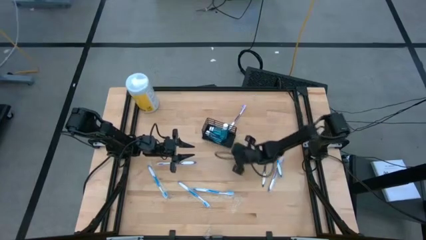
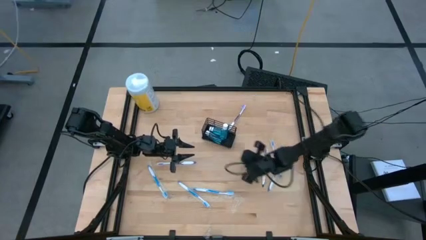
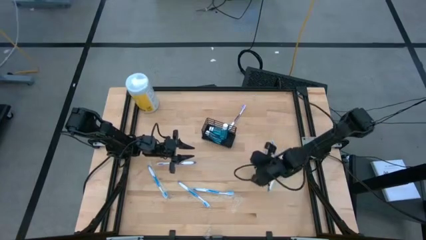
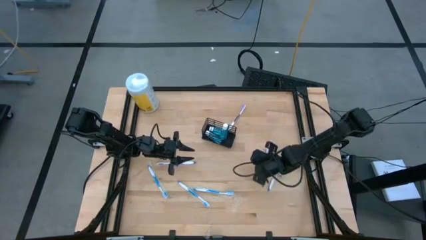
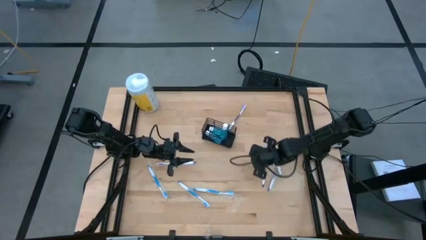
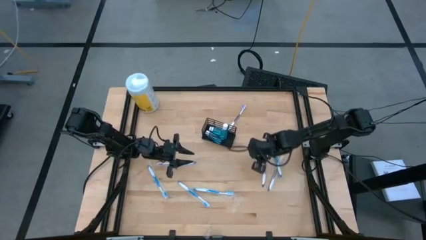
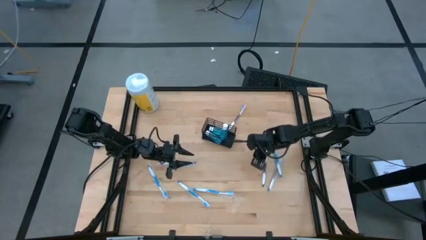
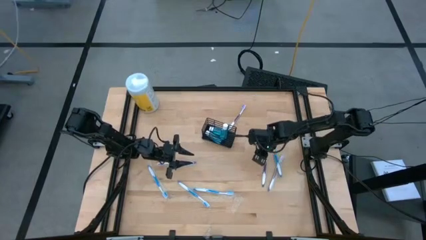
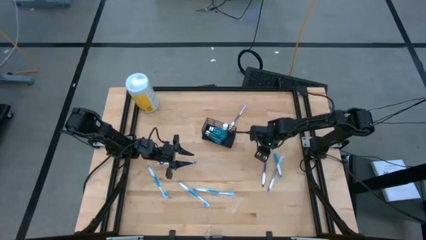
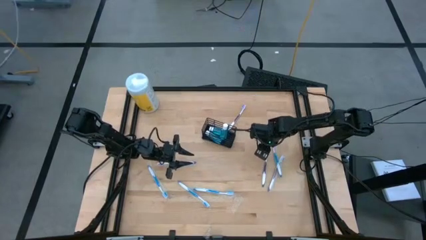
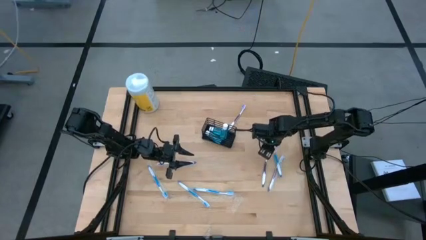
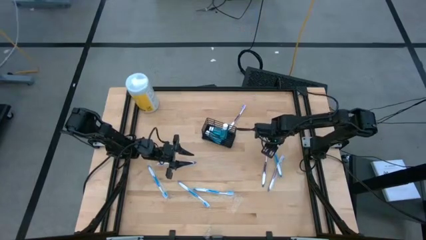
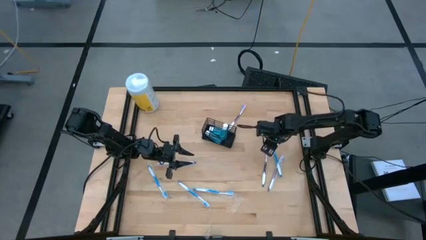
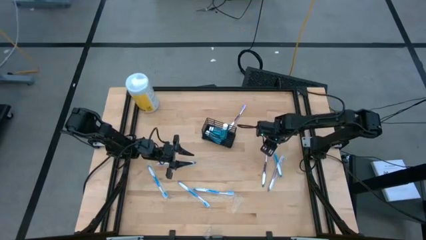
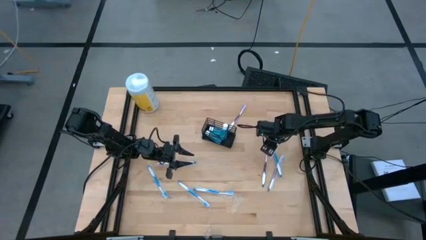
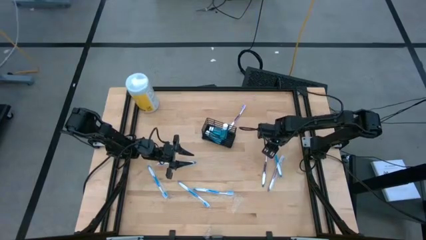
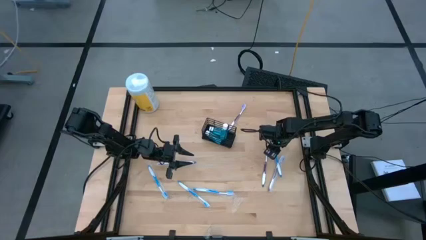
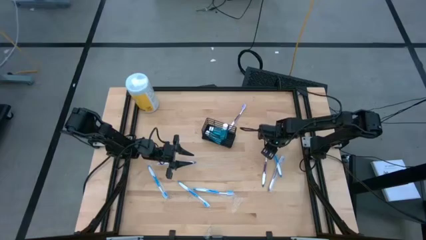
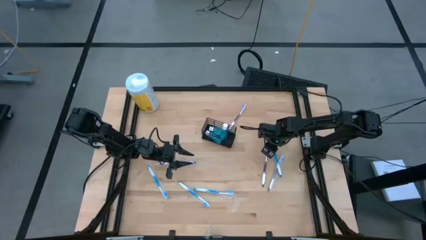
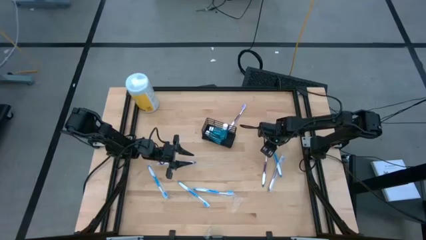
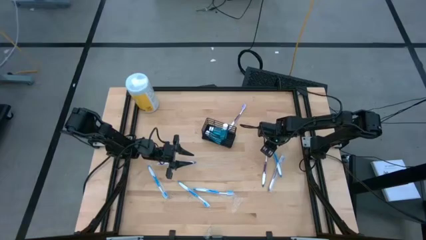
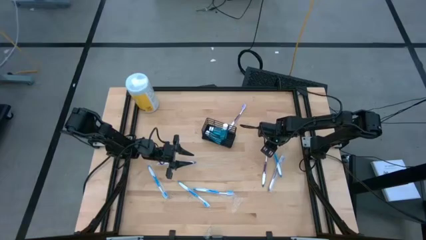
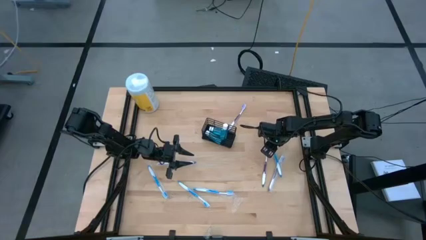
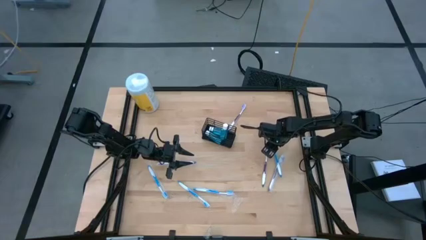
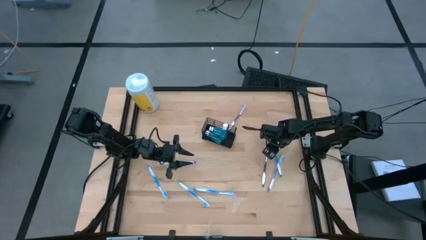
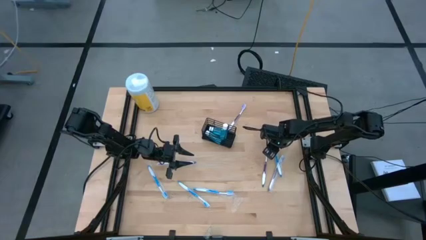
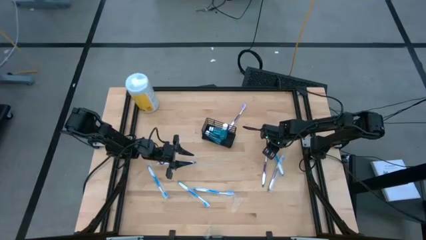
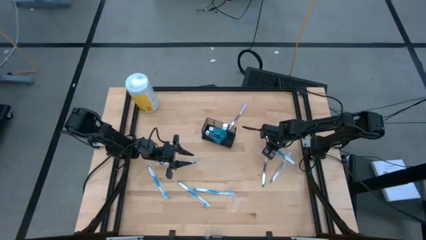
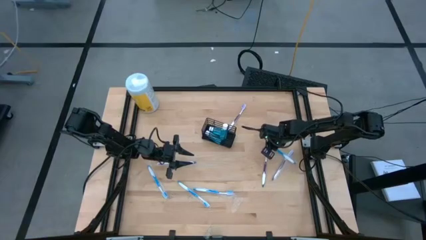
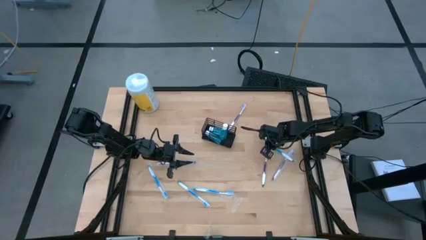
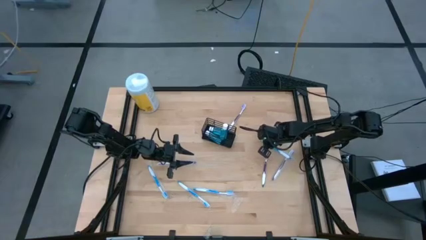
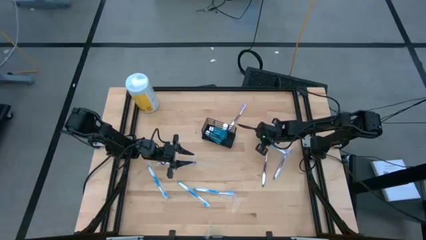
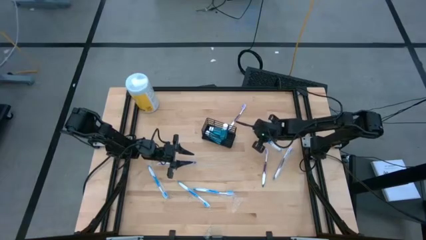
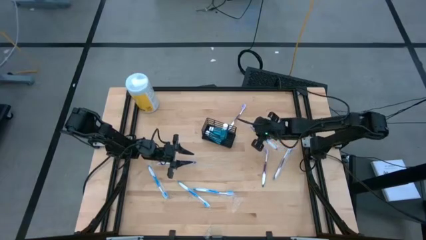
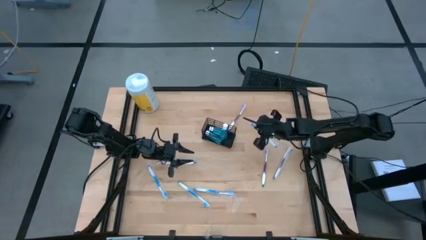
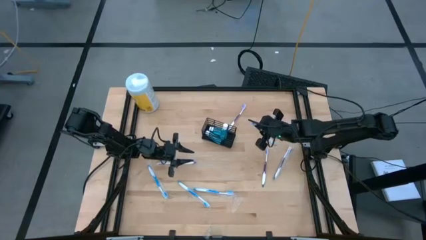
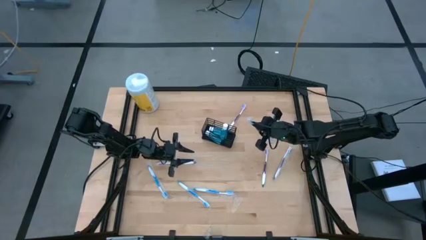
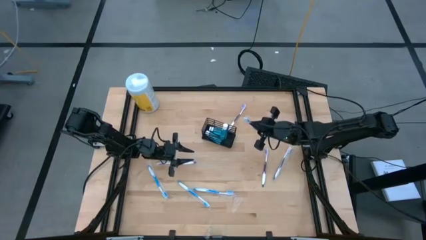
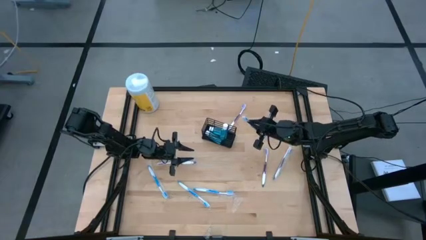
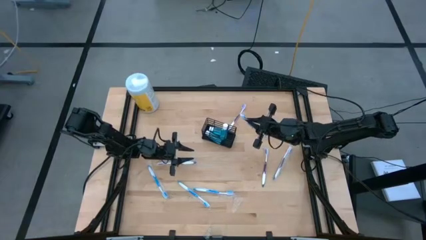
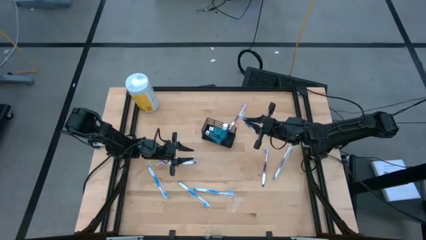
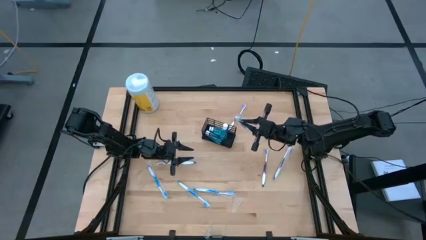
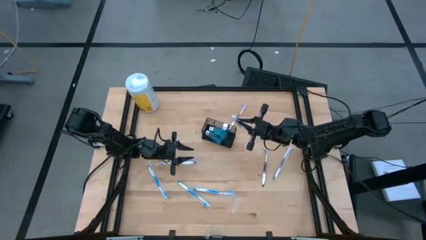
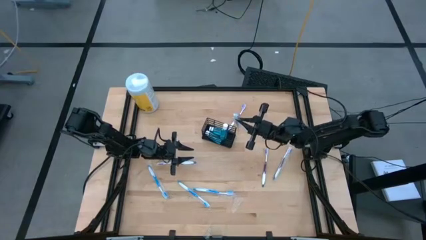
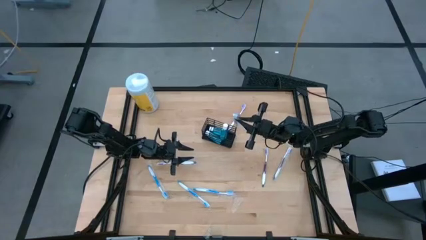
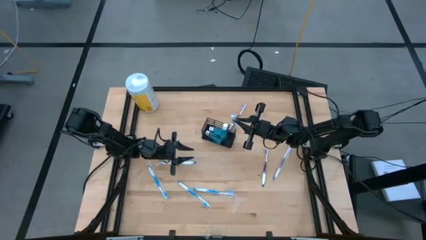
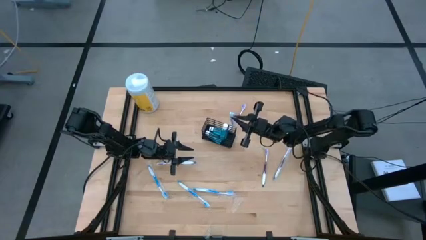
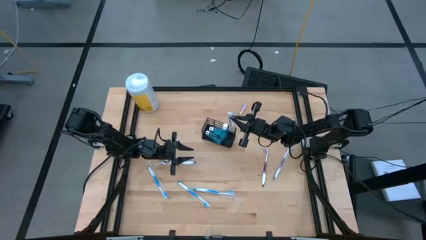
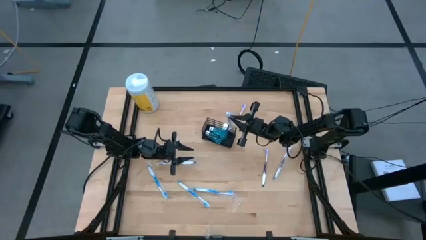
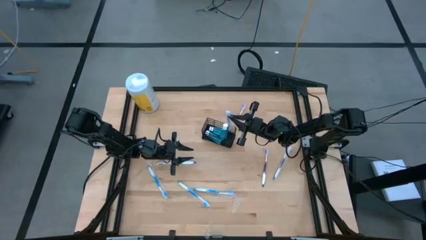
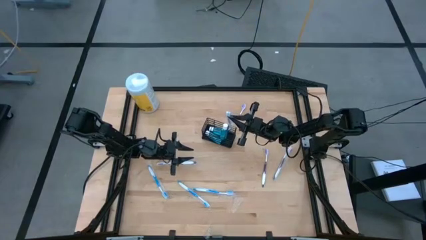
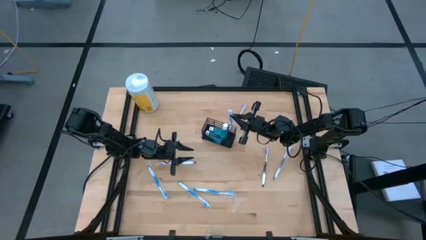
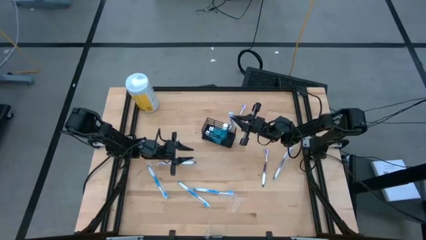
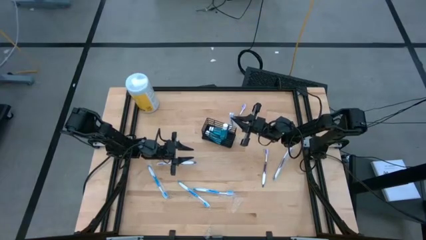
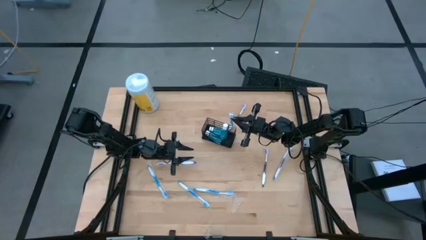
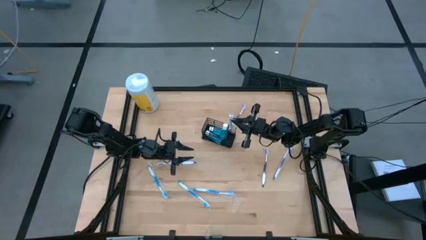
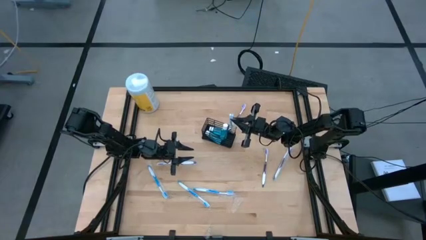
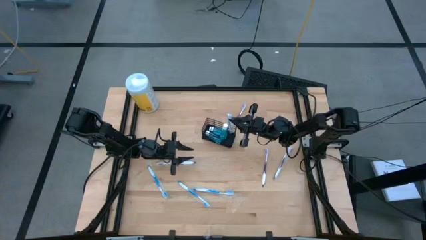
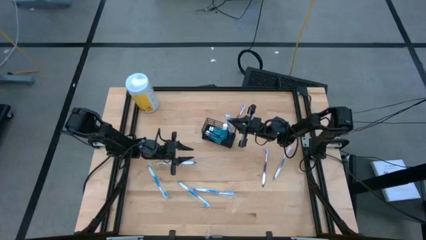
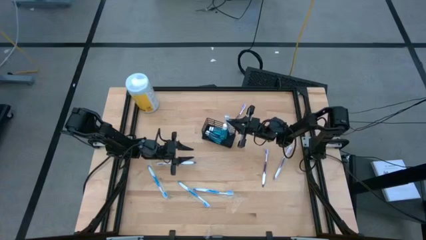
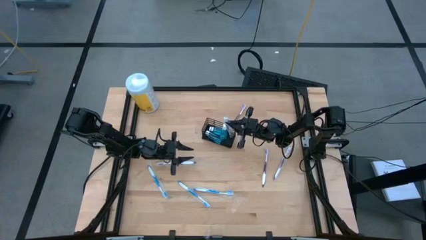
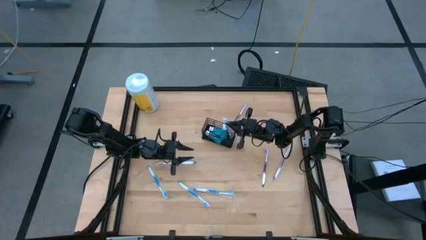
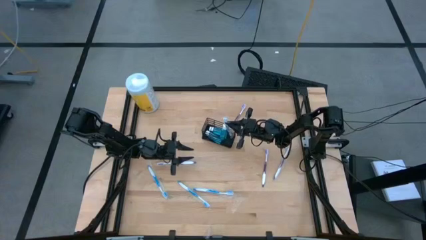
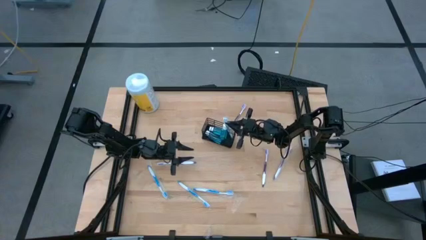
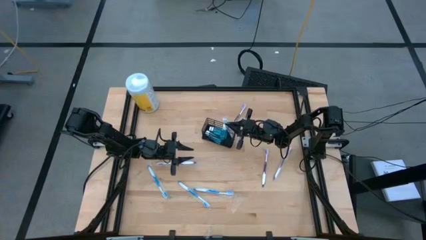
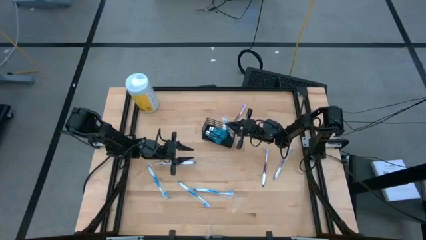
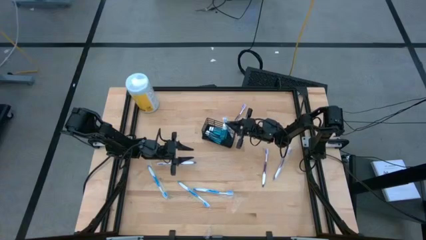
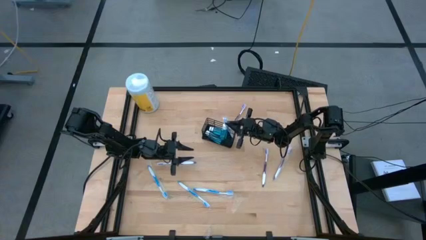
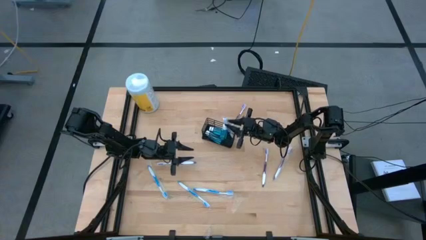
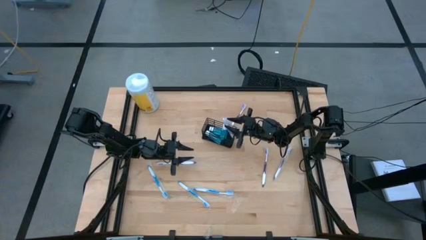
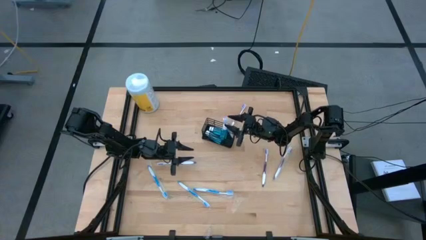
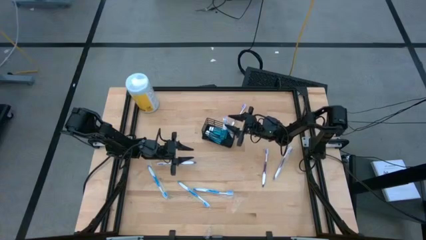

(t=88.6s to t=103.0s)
Task: Pick & Place toothbrushing station
Put the blue toothbrush into the wire organizer

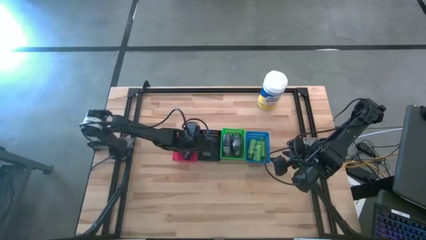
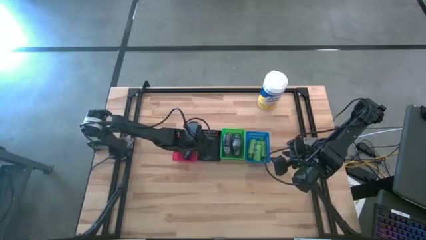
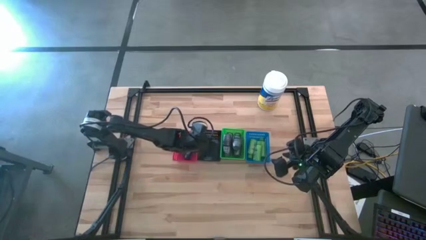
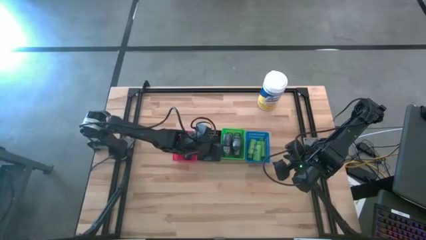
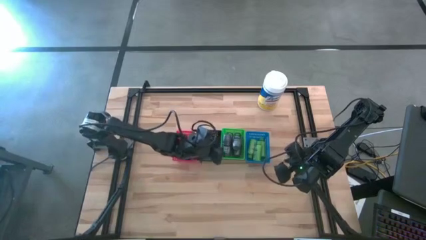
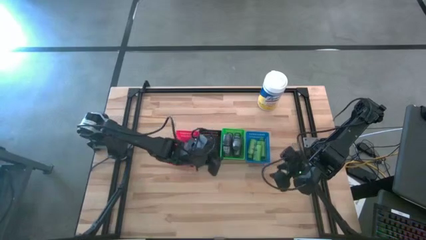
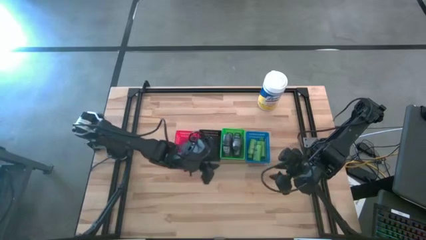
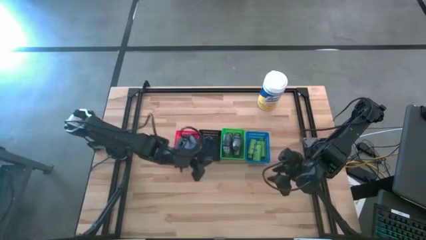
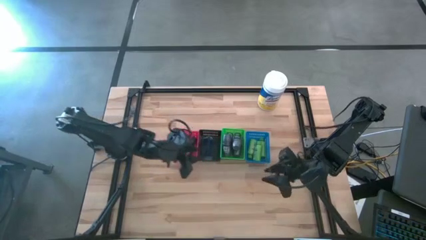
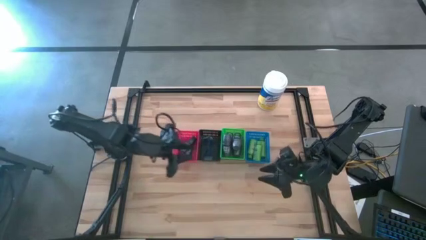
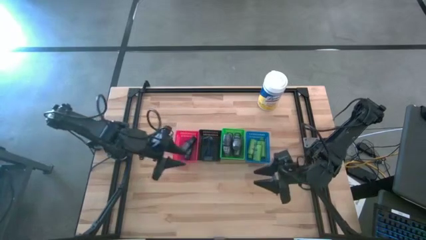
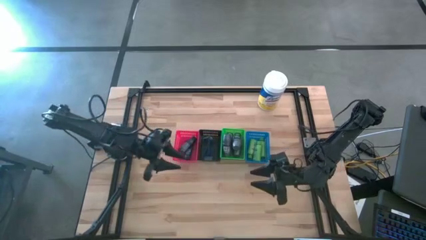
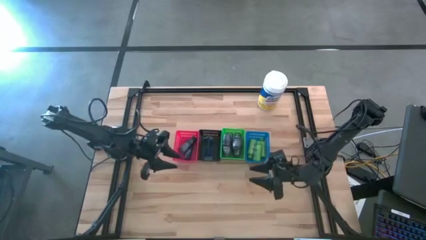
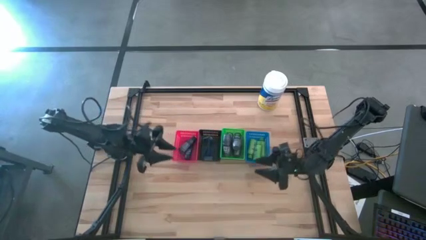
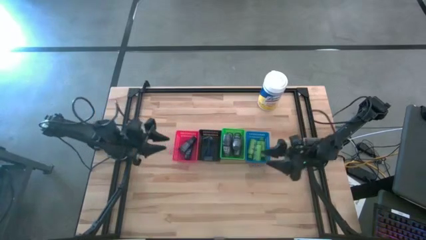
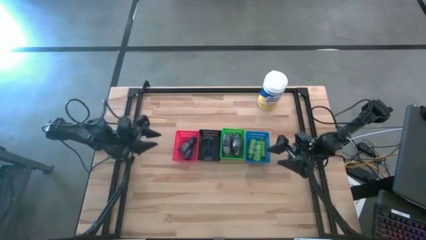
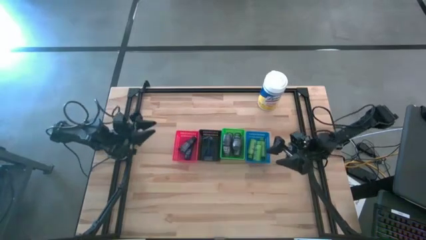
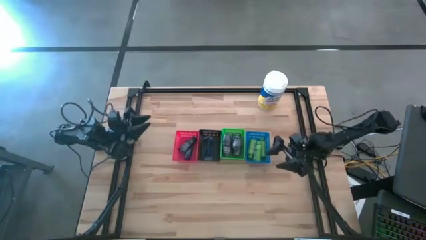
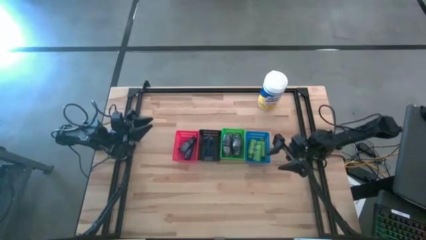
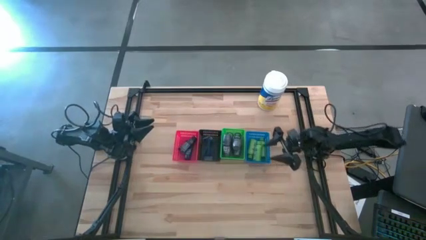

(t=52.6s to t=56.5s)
Task: Pick & Place Travel size toiletries
Return to Home Position
